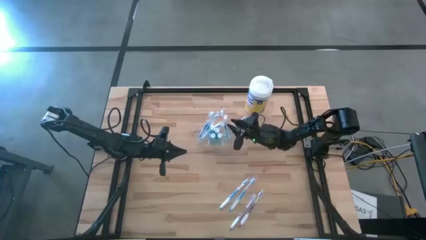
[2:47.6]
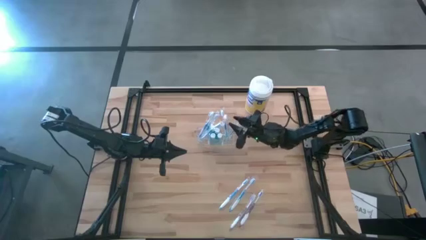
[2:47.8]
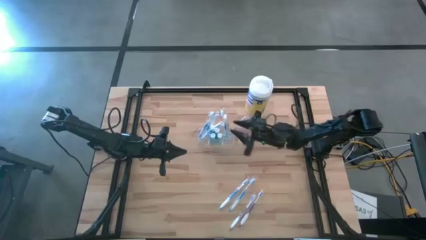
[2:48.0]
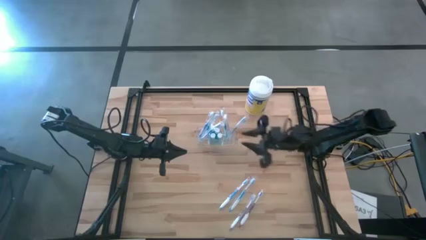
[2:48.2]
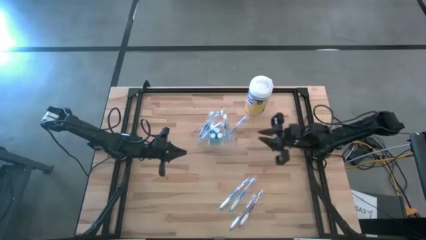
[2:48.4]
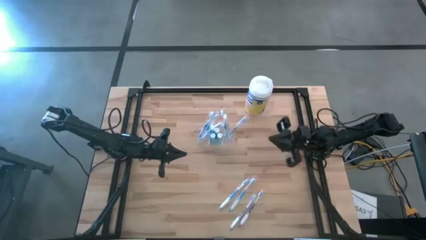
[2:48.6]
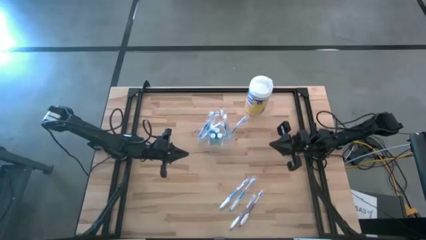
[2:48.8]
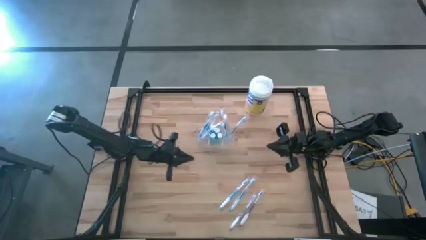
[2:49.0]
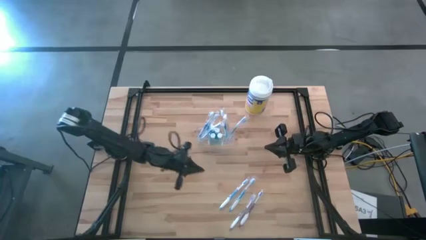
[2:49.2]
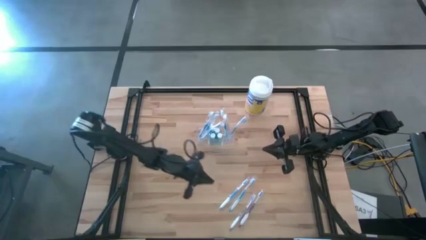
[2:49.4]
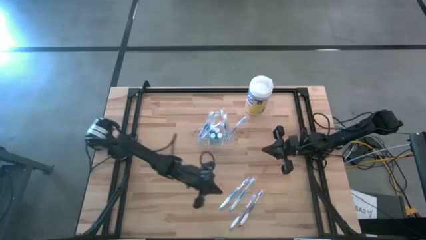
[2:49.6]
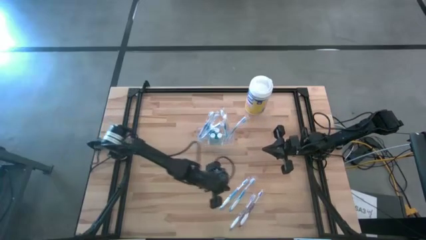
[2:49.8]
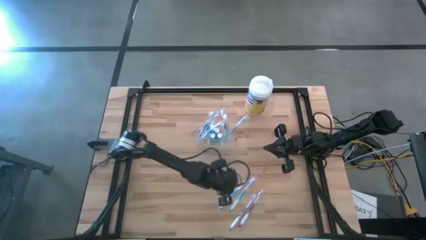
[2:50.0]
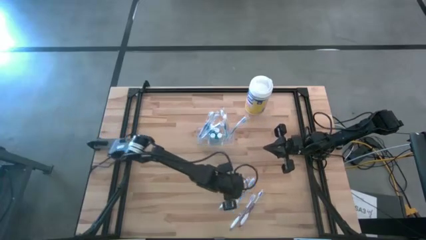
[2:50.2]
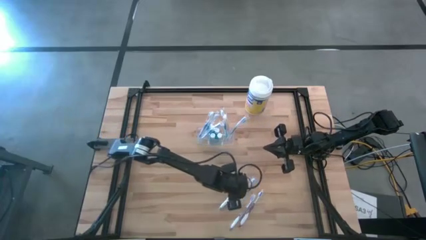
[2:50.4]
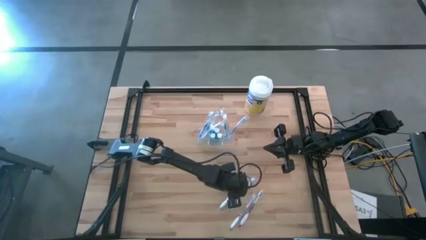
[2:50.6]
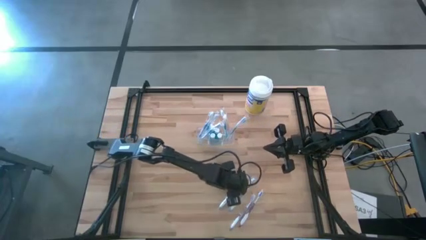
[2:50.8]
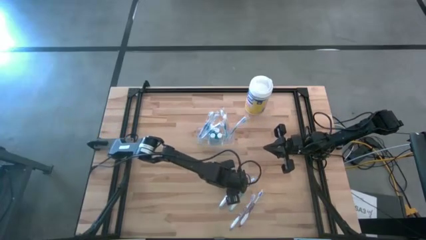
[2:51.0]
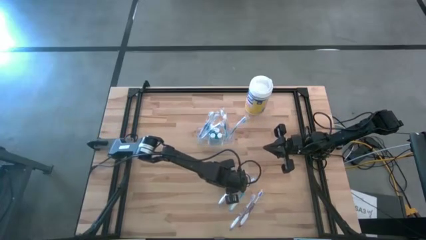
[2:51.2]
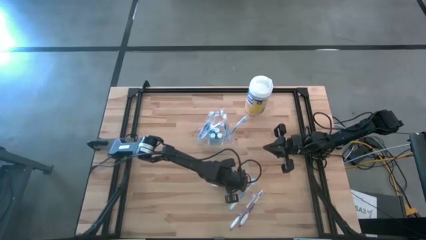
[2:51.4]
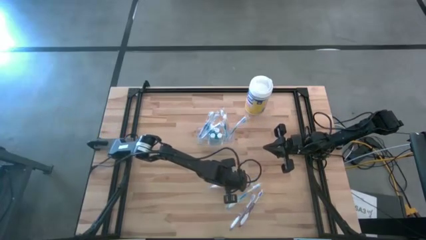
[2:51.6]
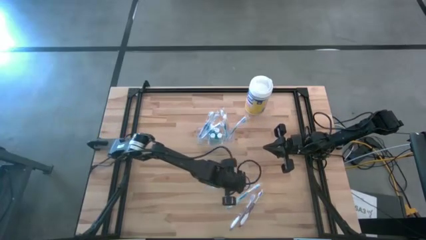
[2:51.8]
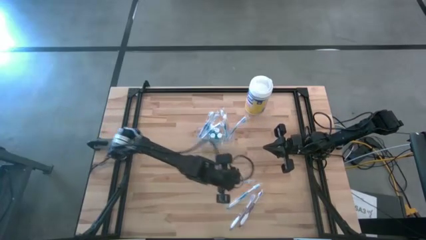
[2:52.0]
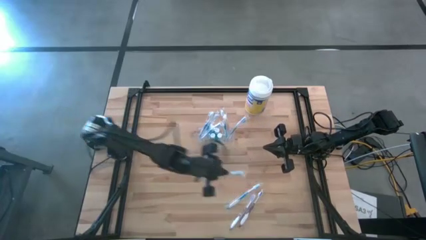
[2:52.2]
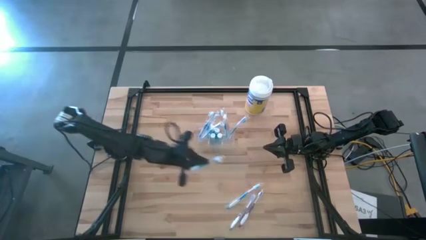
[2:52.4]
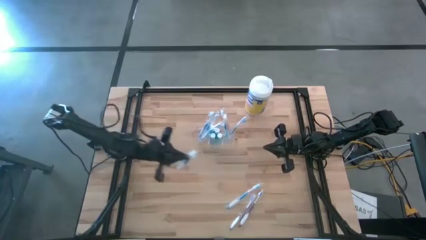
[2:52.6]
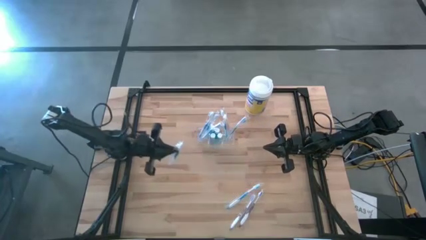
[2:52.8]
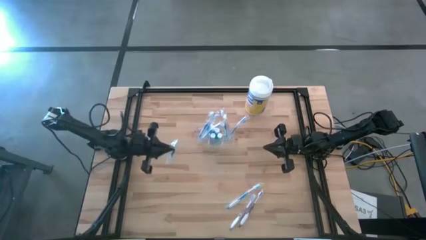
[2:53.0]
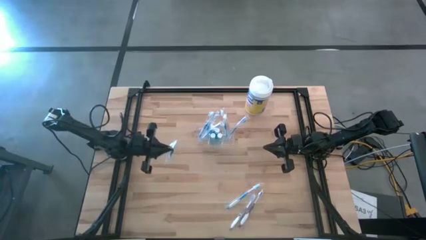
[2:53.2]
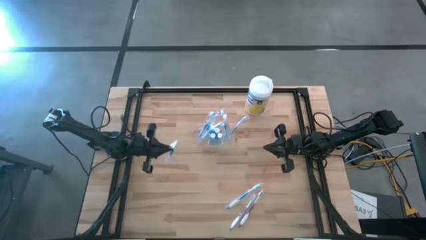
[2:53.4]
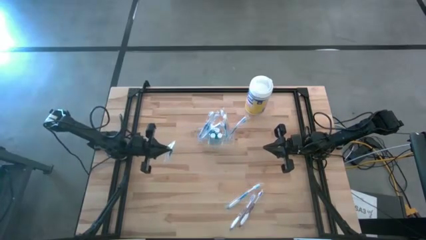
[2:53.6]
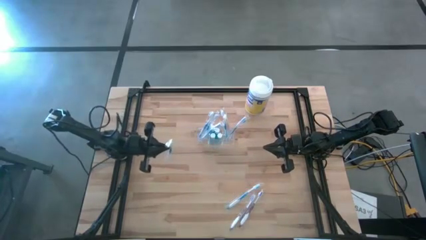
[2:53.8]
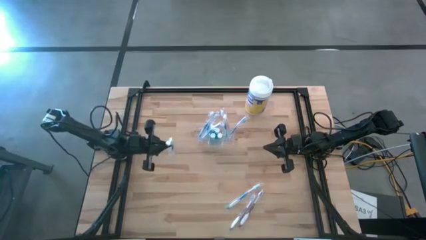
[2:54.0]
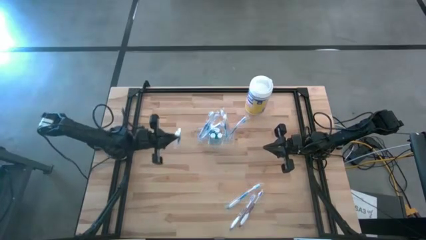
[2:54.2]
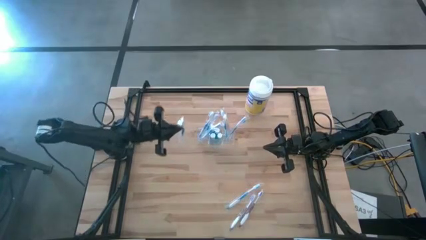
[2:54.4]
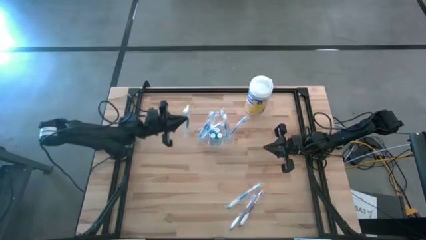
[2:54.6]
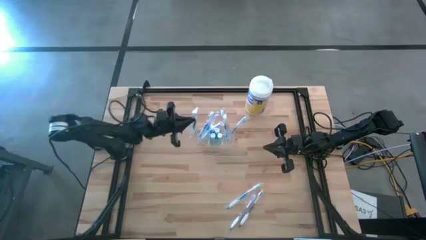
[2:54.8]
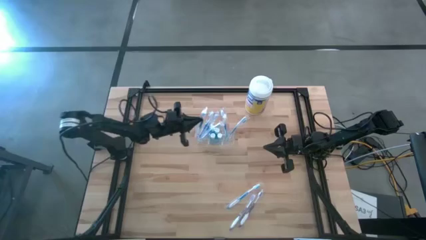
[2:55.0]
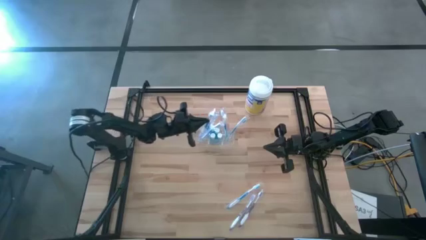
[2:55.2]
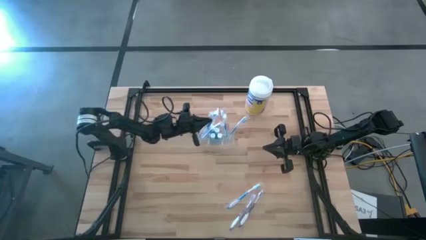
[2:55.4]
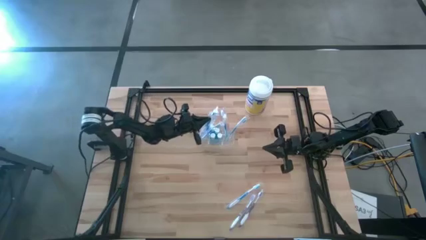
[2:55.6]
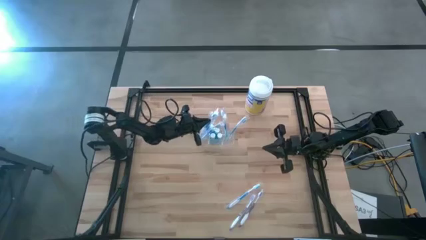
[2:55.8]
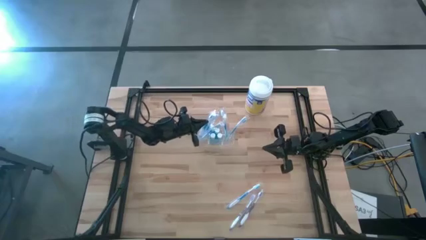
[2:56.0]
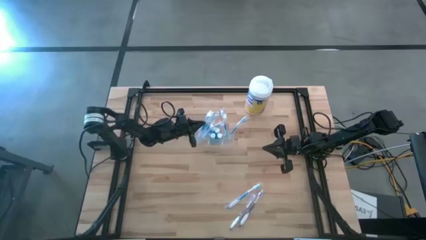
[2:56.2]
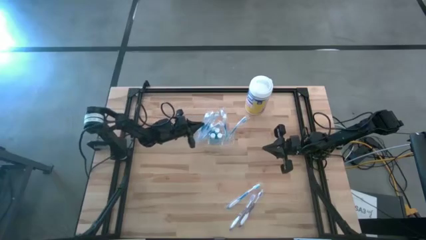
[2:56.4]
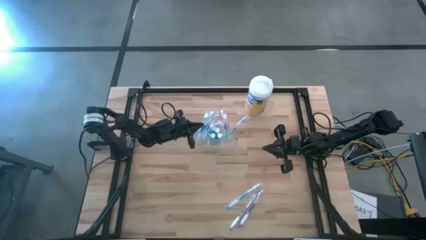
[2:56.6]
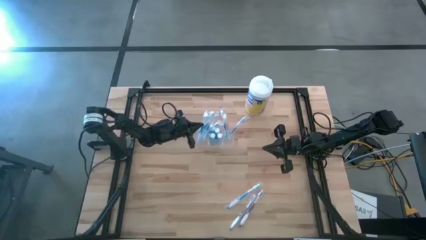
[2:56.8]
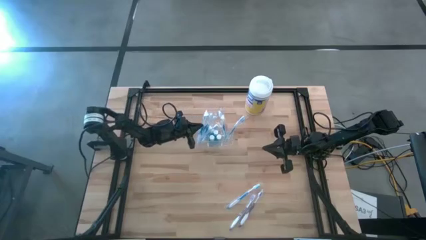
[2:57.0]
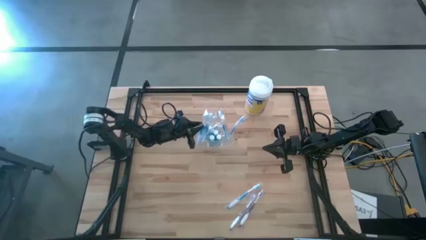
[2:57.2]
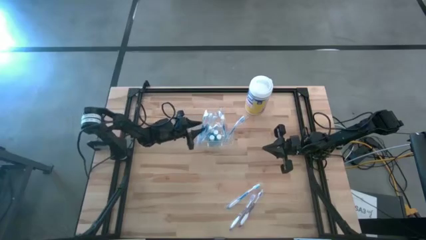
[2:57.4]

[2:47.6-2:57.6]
Task: Pick & Place toothbrushing station
Put the blue toothbrush into the transparent organizer
